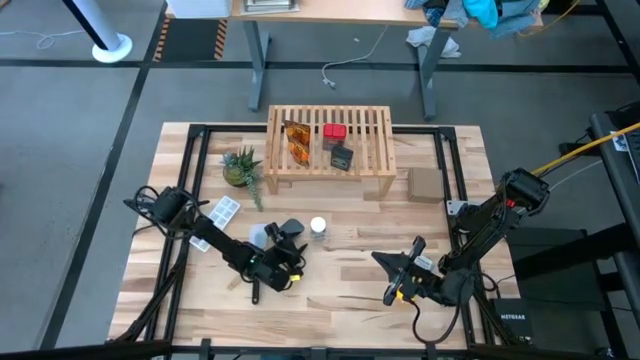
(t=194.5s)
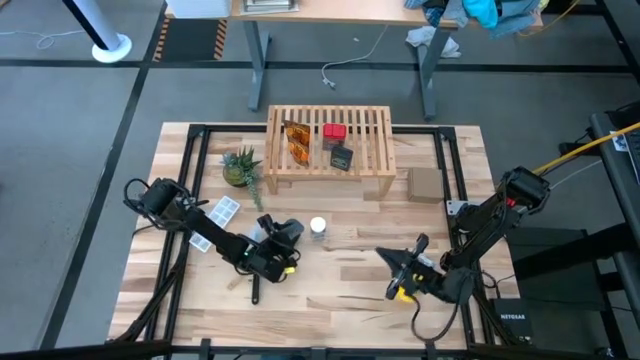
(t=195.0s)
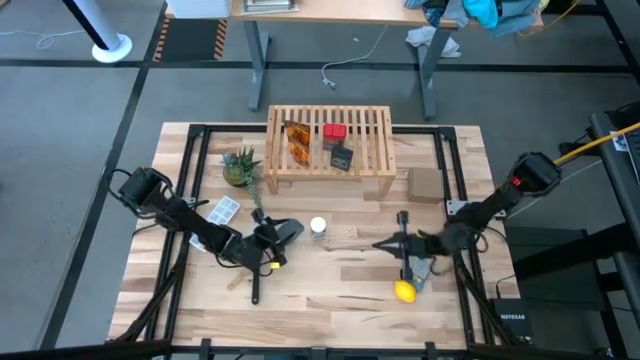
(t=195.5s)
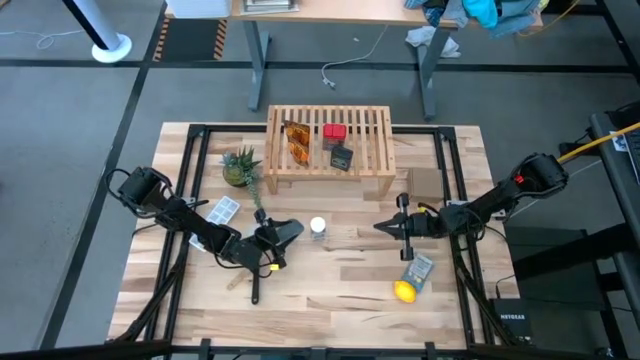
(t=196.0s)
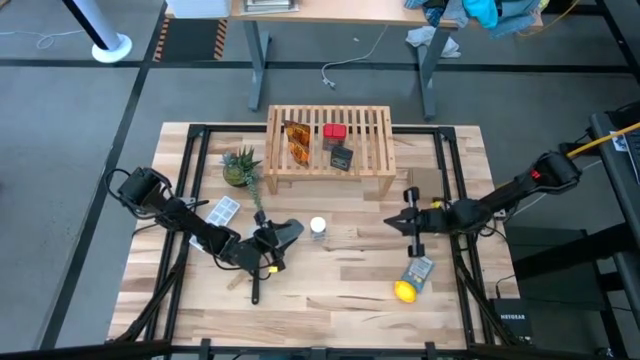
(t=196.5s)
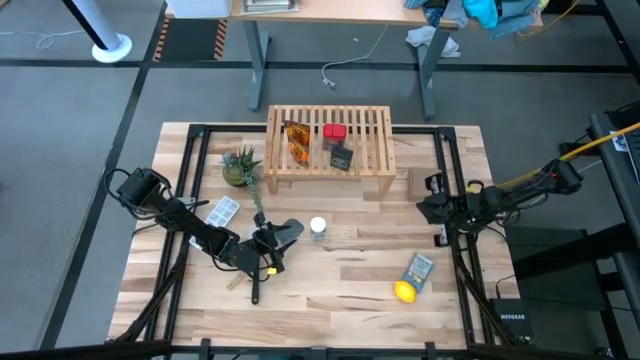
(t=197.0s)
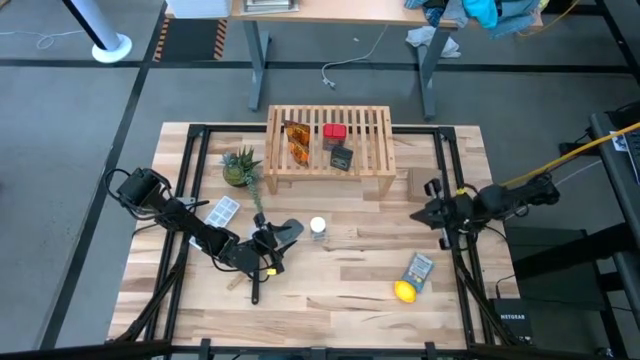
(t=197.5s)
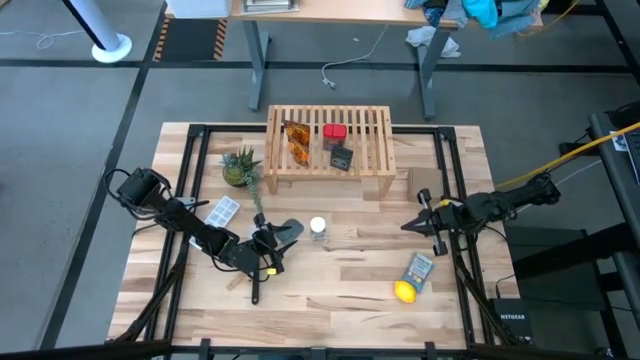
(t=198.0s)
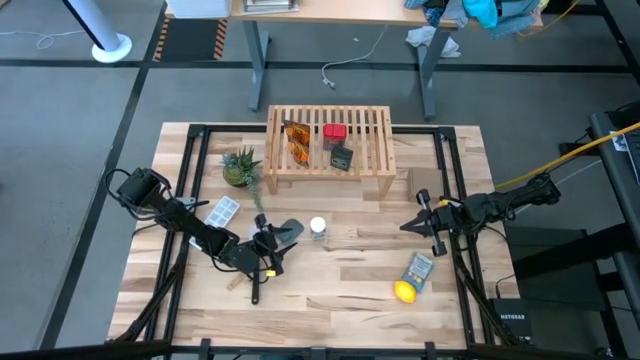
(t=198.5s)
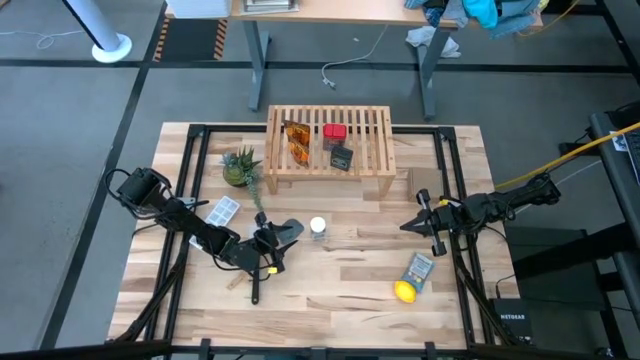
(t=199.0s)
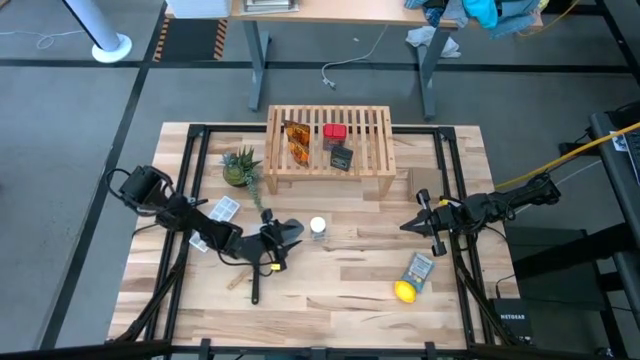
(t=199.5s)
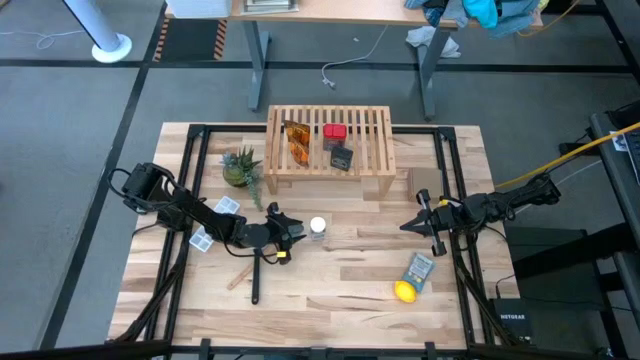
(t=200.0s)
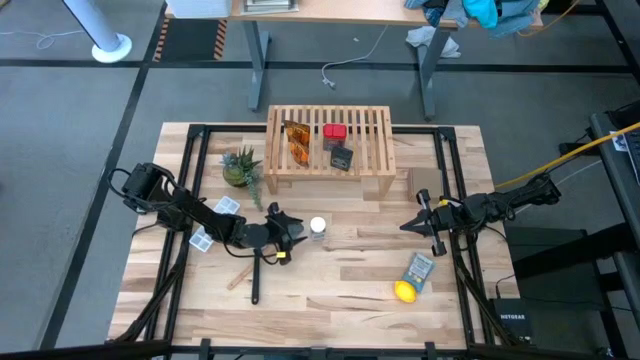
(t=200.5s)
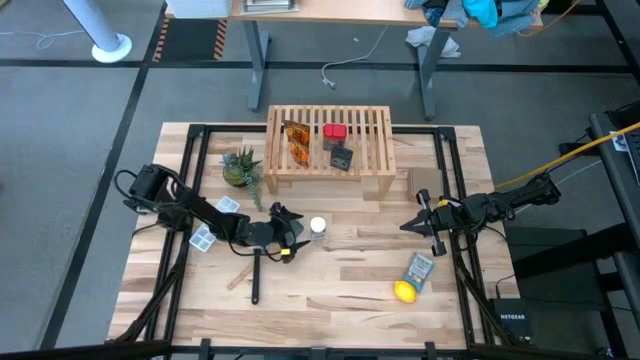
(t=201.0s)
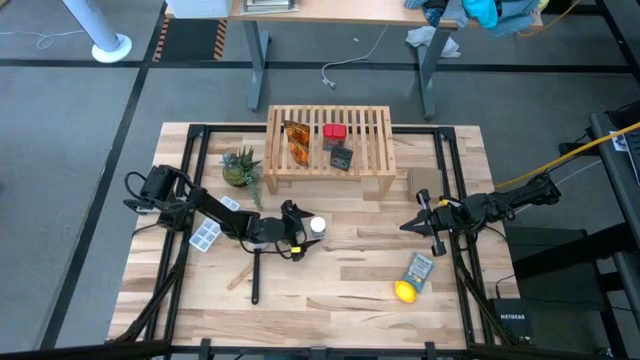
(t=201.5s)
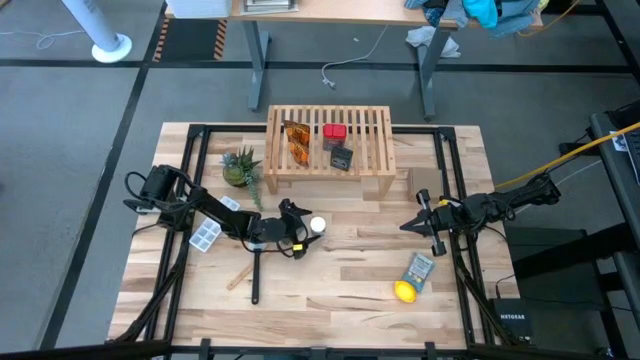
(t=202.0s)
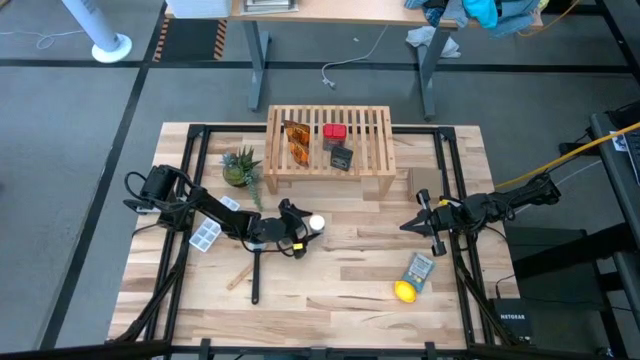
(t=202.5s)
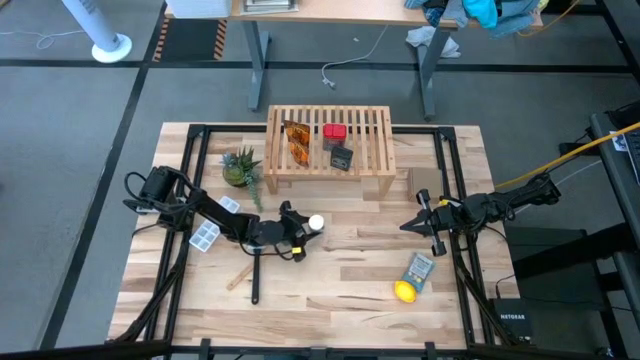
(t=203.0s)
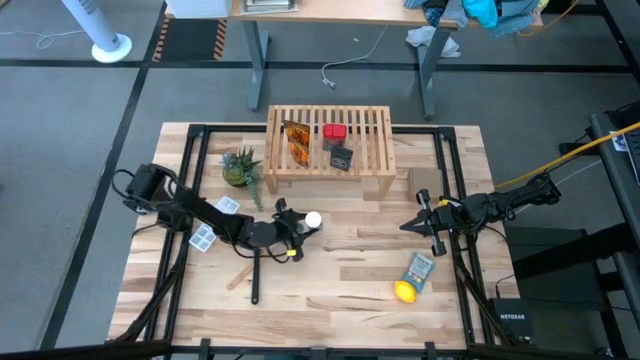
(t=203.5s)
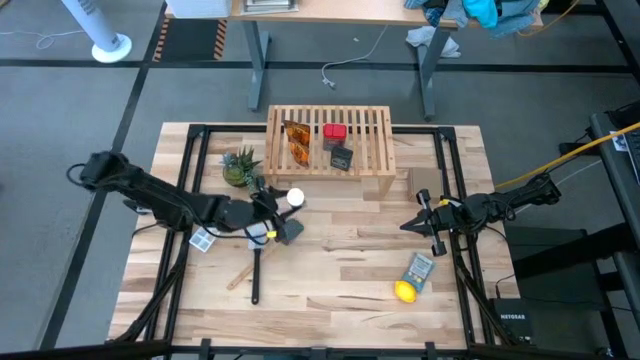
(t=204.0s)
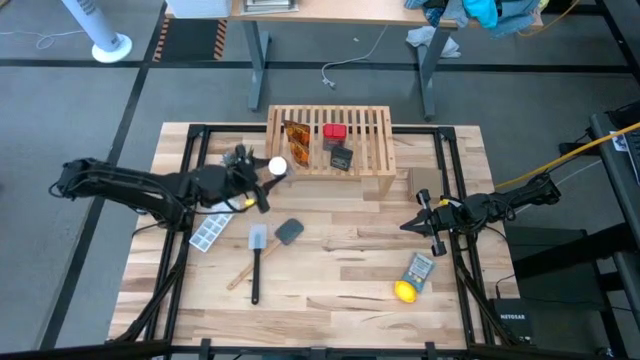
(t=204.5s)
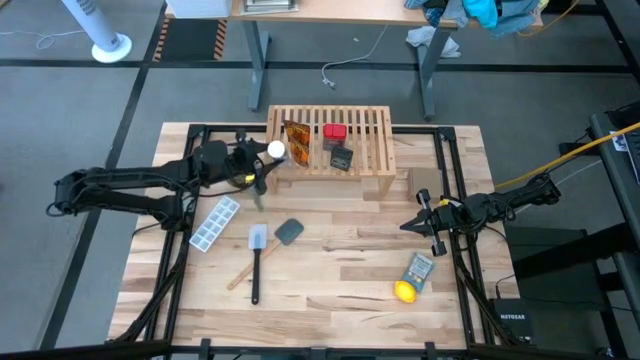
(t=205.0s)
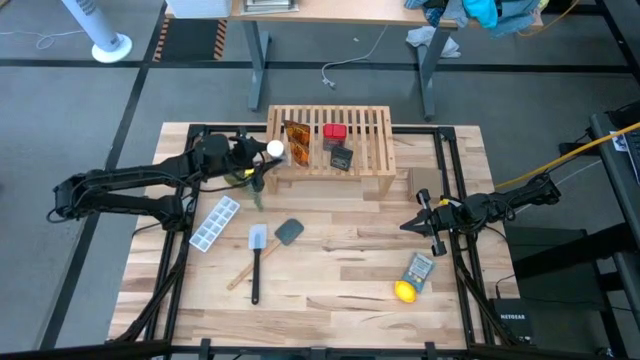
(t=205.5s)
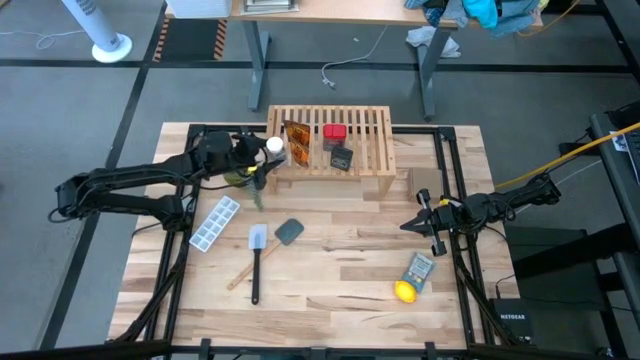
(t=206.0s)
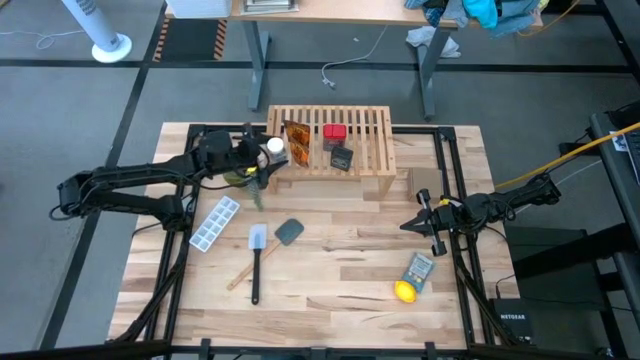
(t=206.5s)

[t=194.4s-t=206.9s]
Task: Shelf spices
Put the white seasoning bottle on the shelf

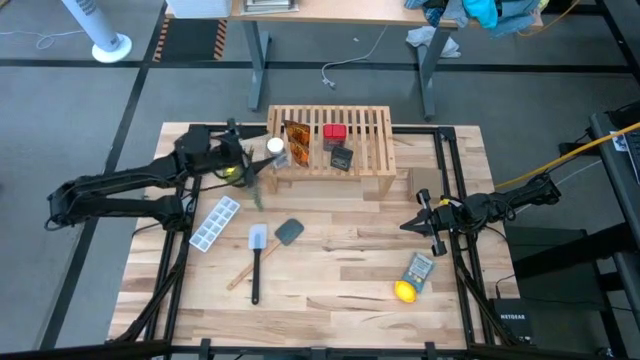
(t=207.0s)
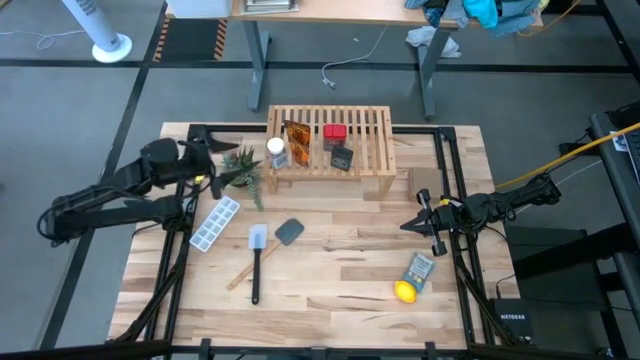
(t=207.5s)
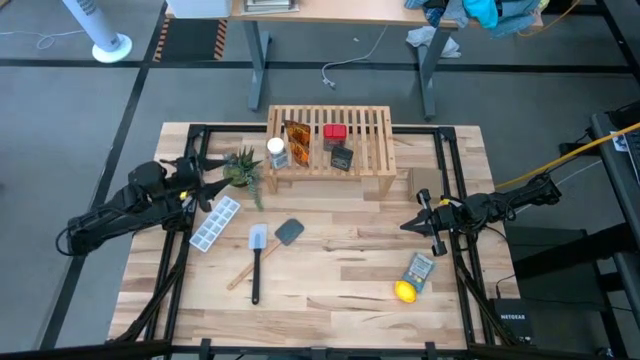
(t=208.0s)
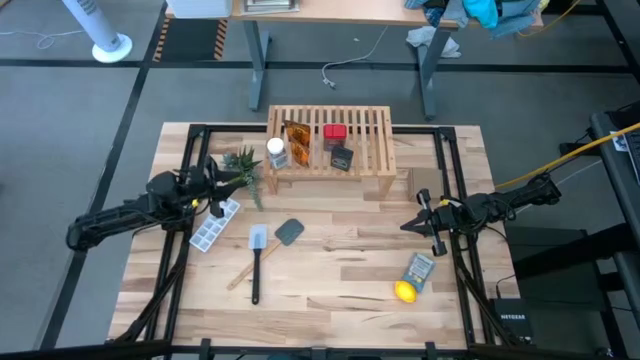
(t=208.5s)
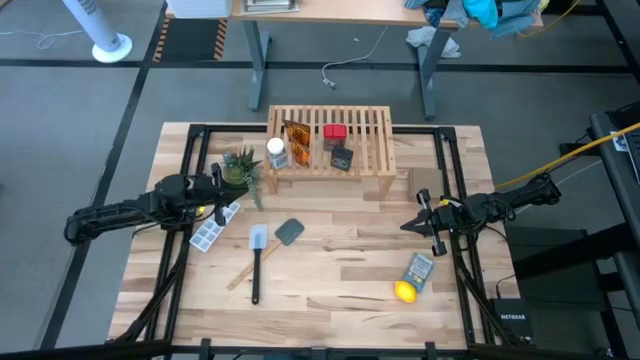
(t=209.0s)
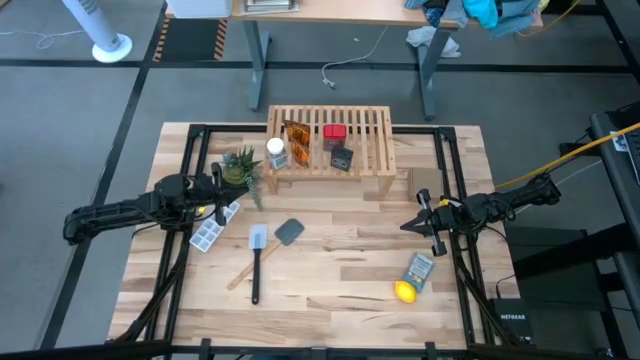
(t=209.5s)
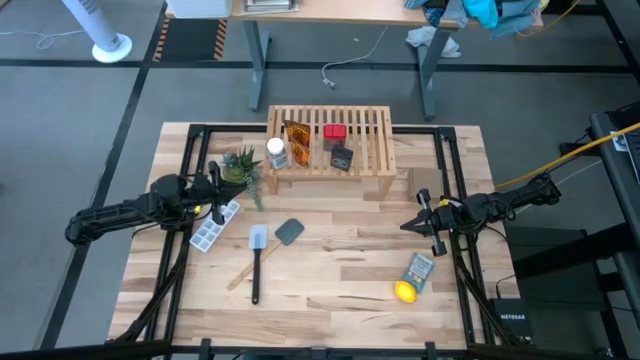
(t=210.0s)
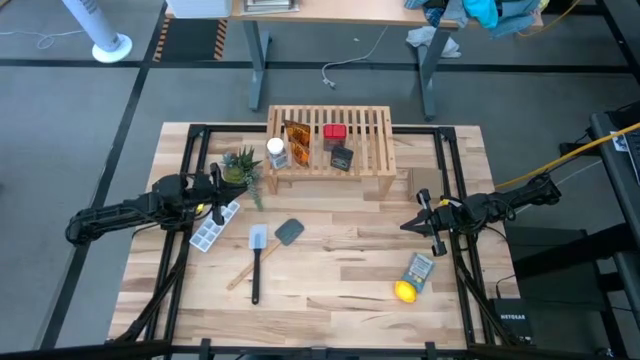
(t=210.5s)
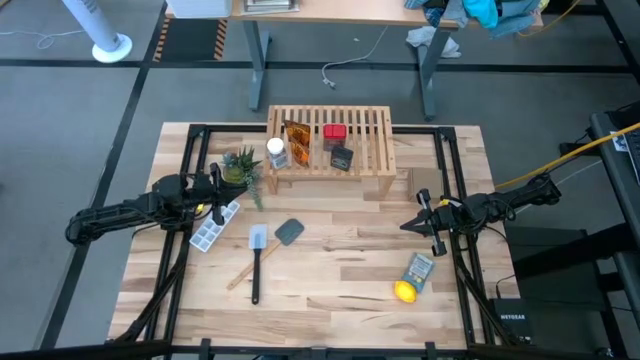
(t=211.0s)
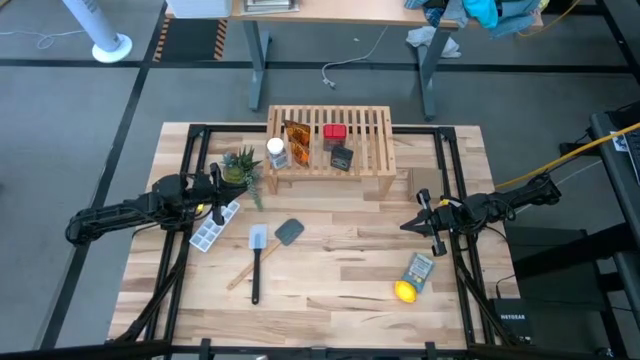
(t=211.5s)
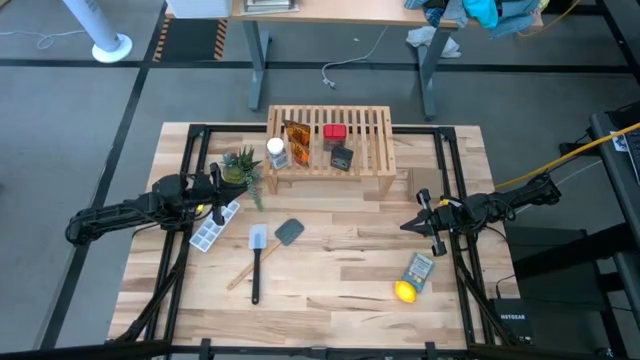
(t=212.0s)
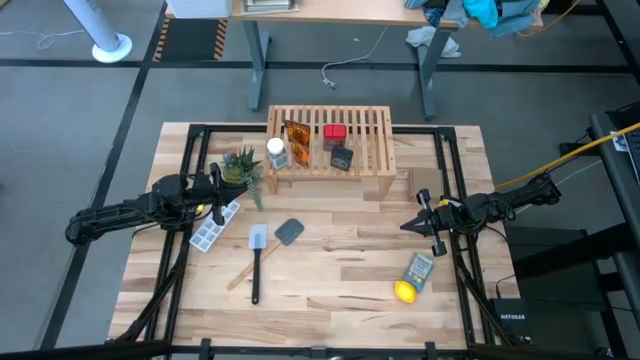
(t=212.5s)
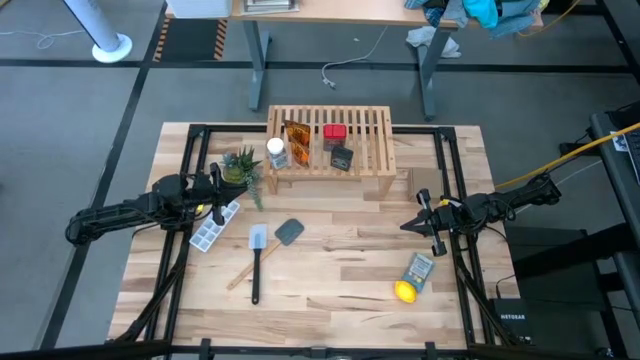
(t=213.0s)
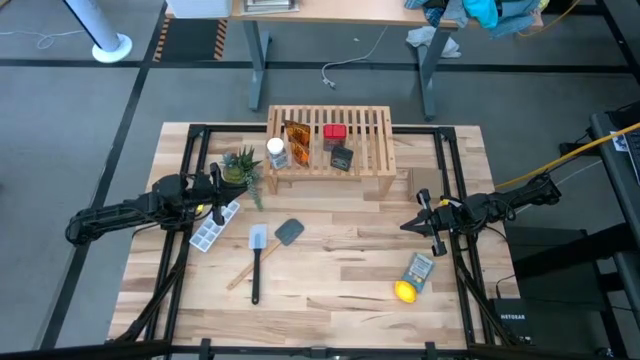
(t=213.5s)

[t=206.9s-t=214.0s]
Return to Home Position
